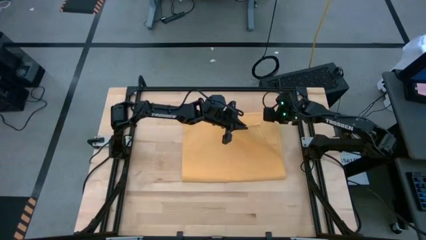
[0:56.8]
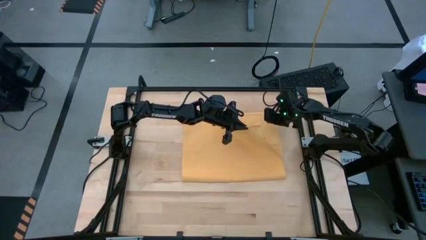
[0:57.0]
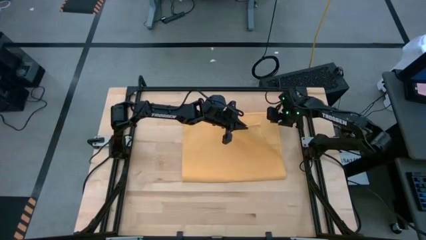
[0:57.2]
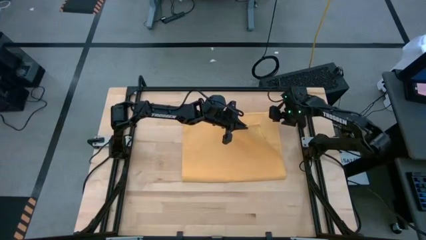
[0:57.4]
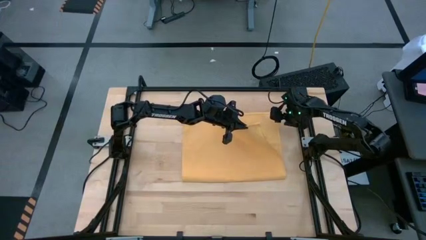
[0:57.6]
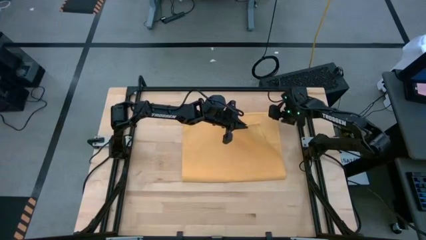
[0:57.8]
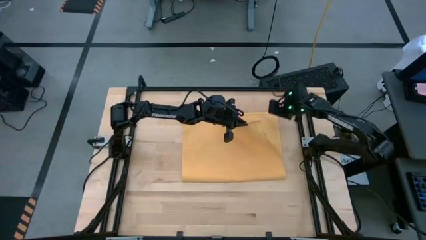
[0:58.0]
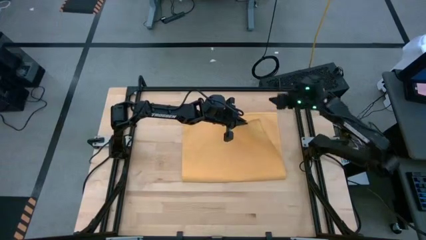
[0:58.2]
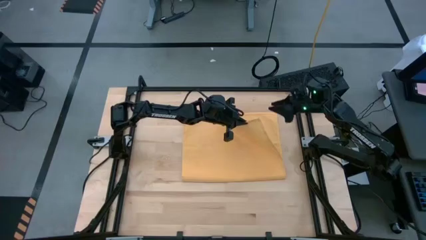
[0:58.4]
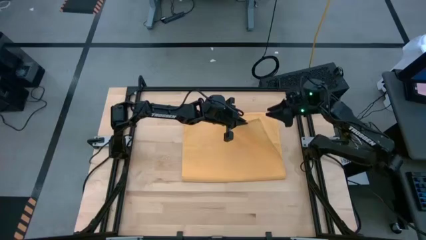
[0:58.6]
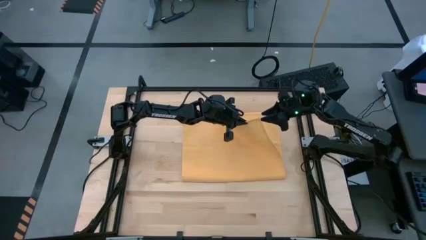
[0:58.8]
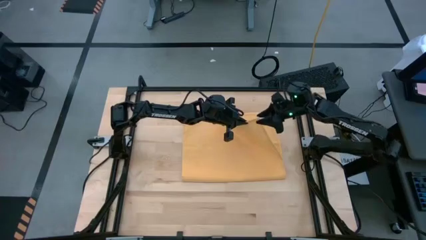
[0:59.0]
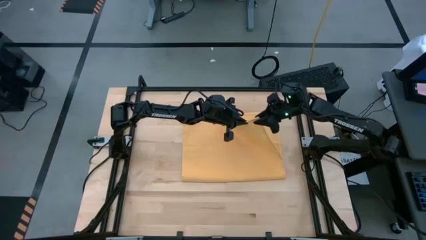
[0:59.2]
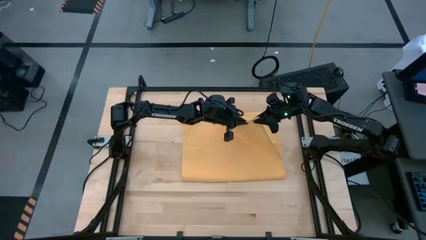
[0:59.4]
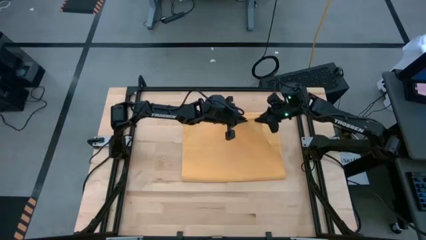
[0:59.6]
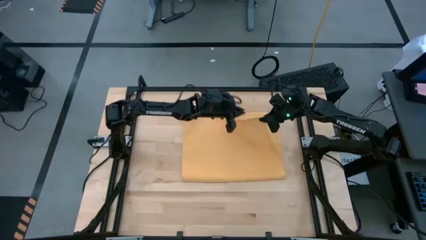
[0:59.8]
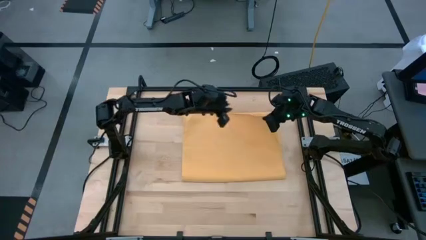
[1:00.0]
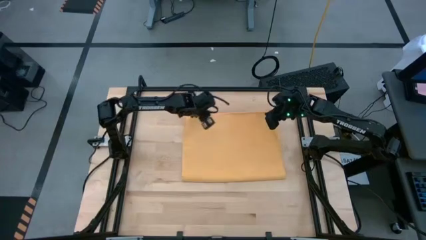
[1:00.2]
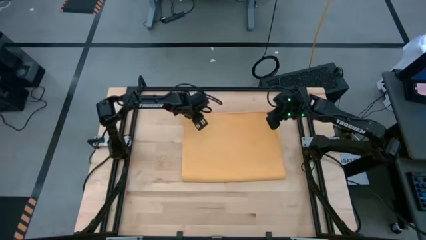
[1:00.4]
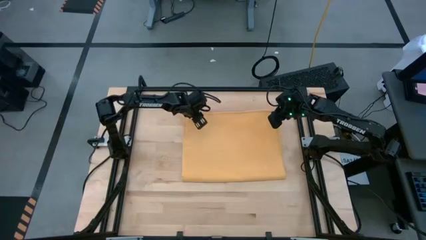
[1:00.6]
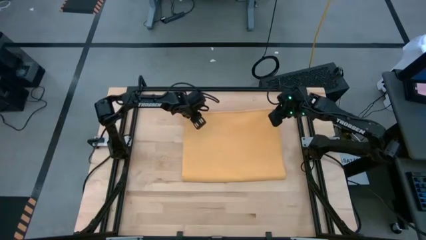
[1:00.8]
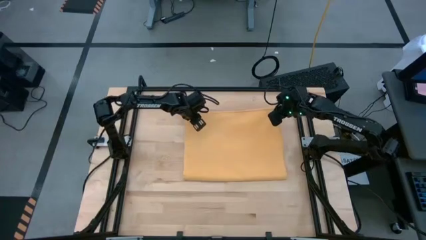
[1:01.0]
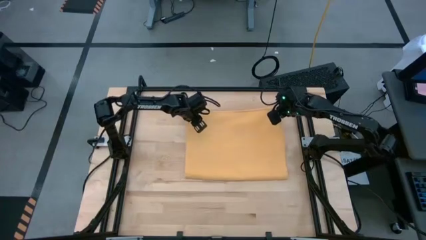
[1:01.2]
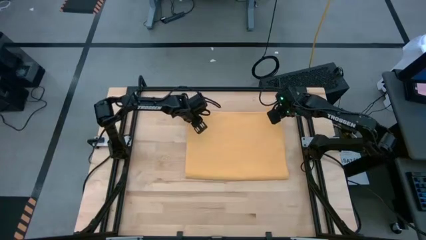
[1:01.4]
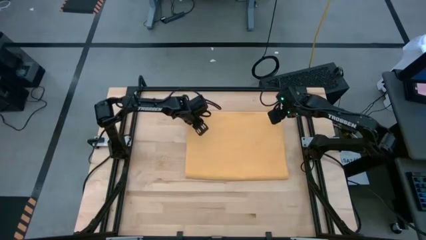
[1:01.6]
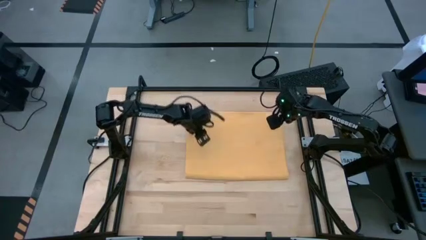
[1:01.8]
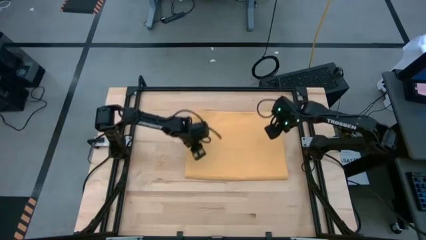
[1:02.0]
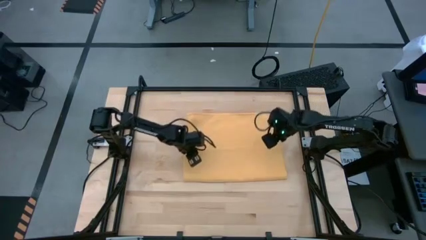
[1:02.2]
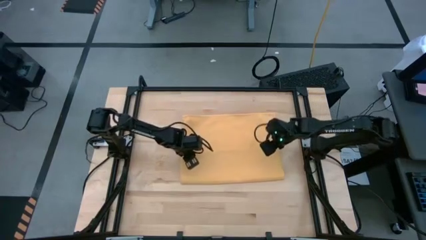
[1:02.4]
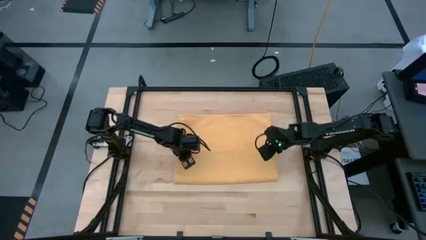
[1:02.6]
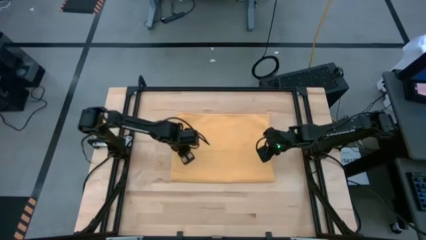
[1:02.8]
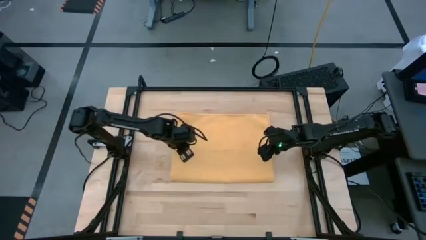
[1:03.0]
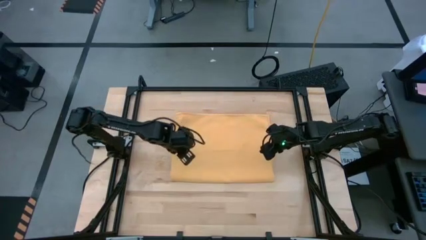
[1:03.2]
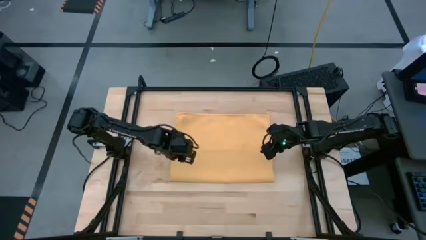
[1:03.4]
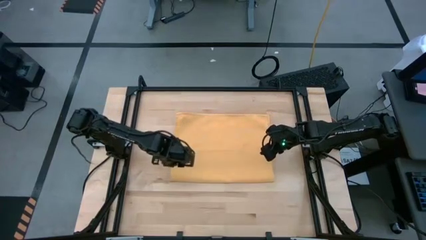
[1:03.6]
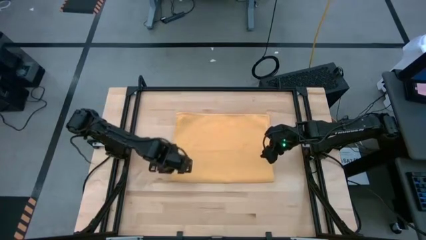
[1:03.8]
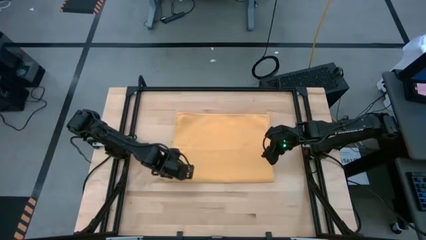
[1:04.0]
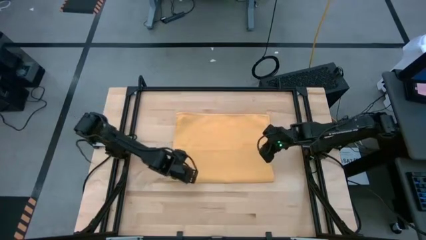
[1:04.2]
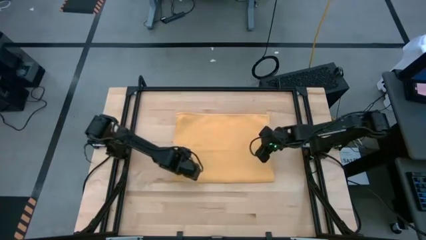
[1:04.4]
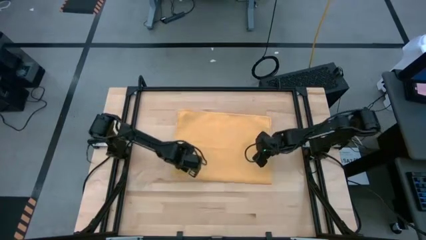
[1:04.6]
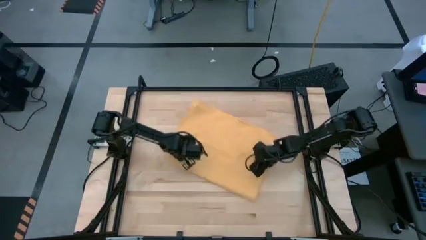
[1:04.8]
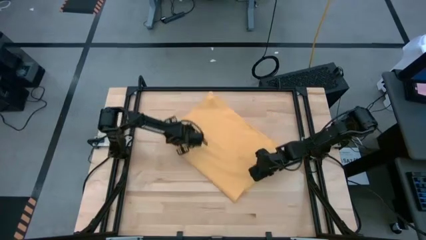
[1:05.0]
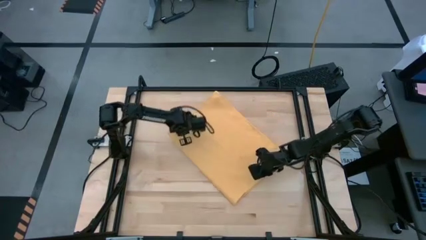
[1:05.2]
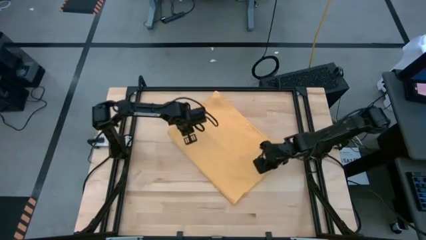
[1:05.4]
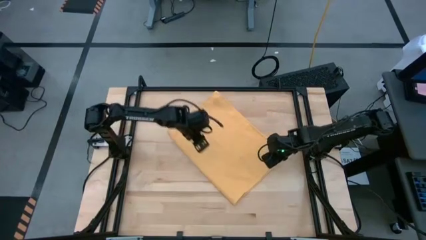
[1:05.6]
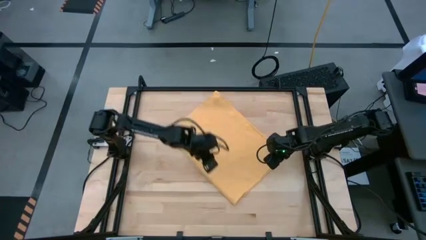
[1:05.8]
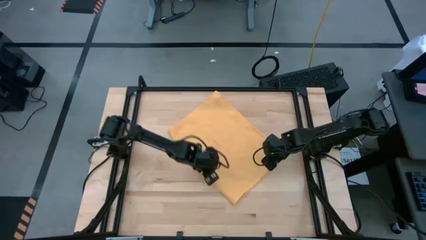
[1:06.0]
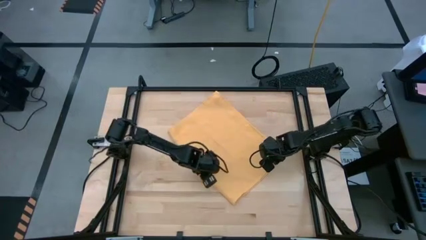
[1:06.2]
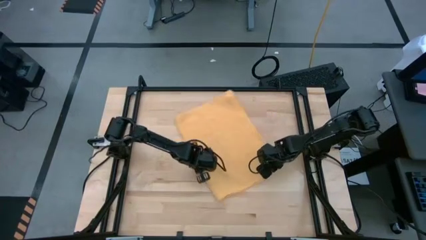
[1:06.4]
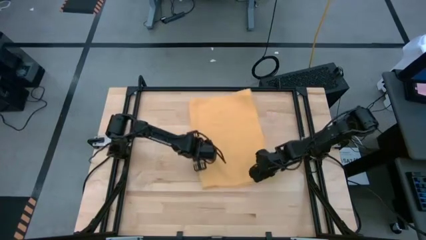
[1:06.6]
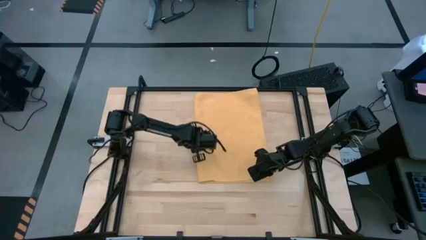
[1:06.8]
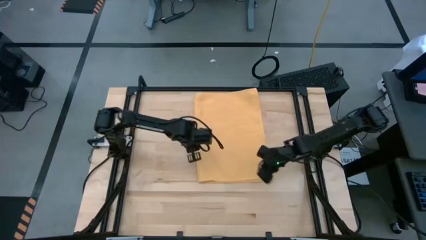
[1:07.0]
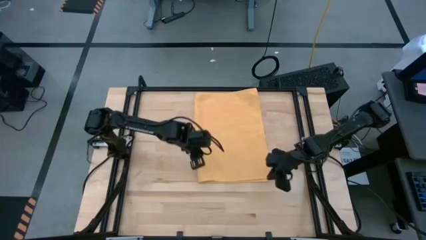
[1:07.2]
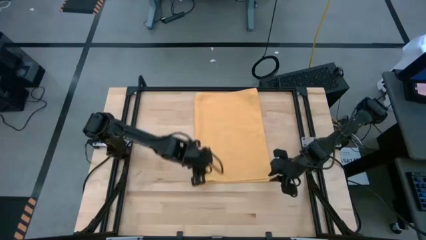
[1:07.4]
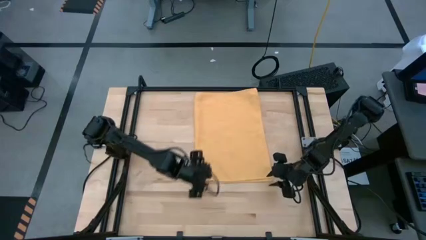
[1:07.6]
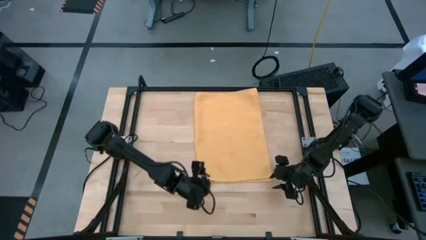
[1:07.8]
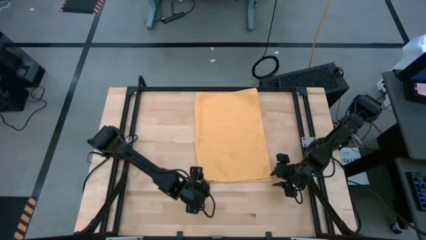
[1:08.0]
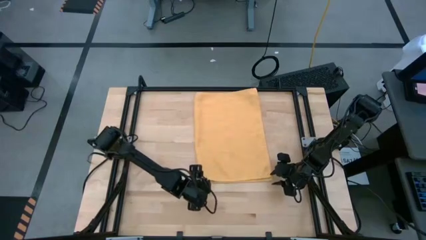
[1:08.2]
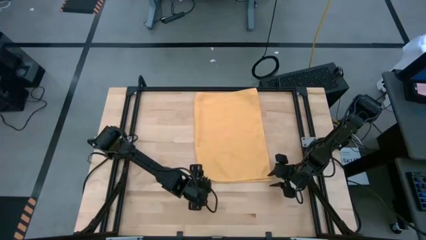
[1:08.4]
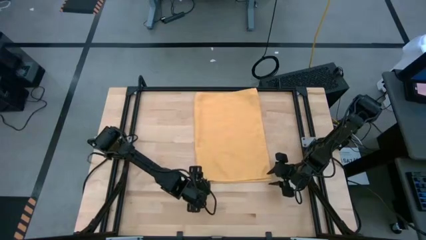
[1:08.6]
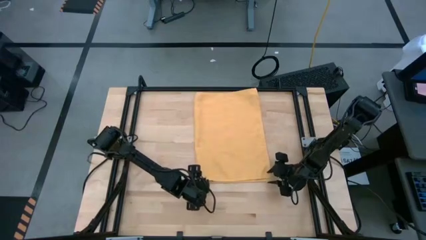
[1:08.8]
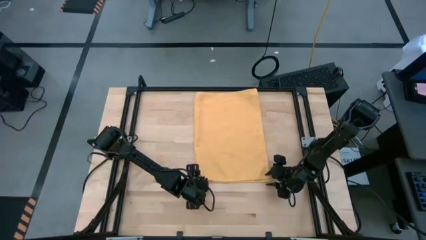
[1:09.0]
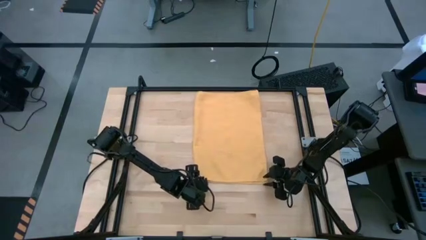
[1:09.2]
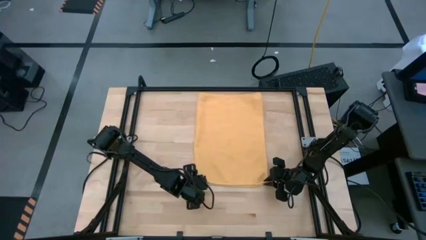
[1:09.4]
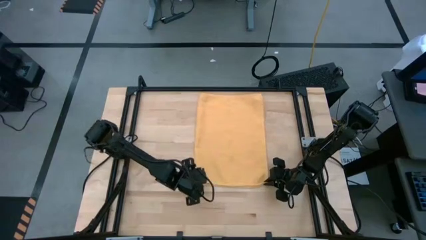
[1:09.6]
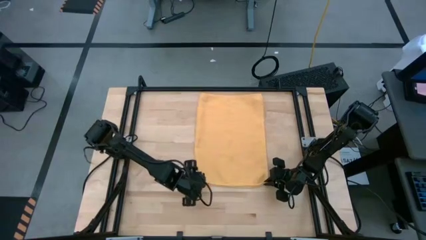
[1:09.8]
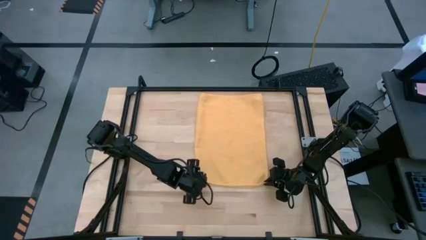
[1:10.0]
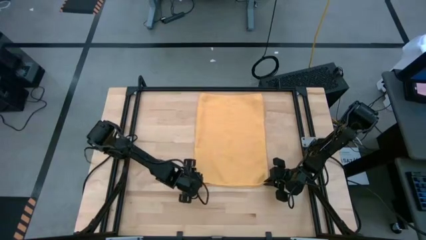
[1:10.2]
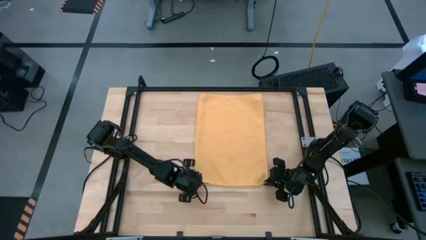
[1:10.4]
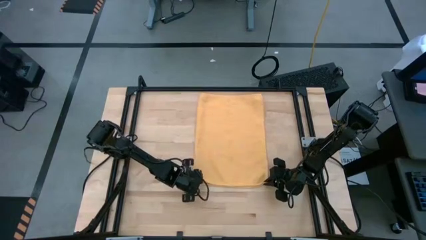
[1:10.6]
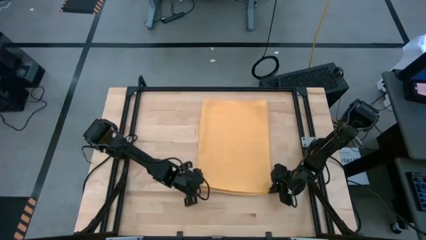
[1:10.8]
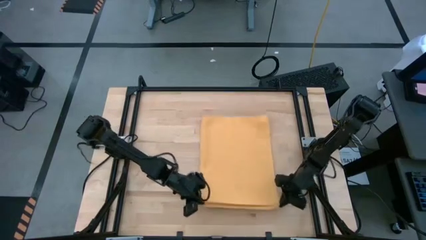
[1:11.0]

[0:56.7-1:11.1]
Task: Roll towel
Fold the yellow towel
